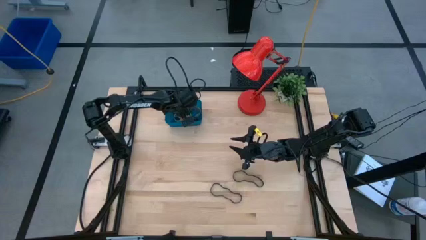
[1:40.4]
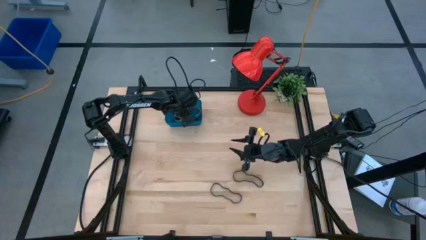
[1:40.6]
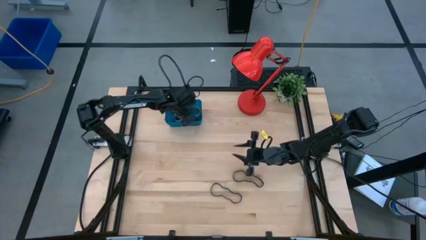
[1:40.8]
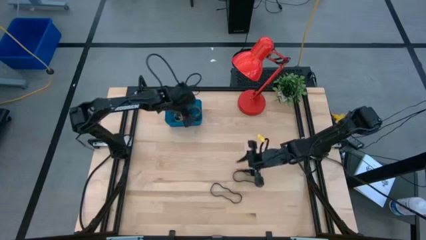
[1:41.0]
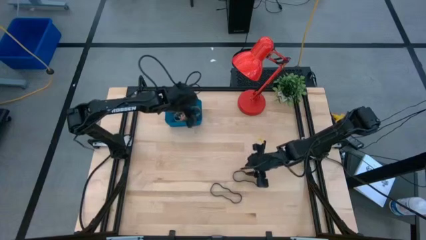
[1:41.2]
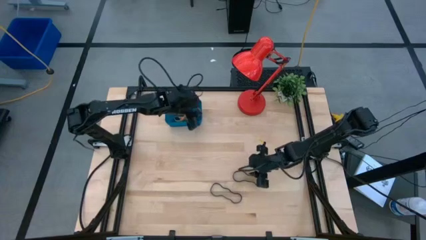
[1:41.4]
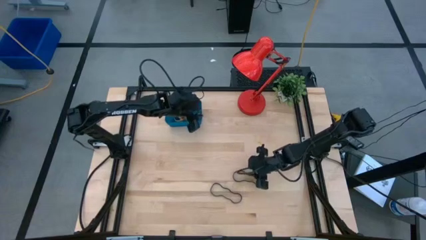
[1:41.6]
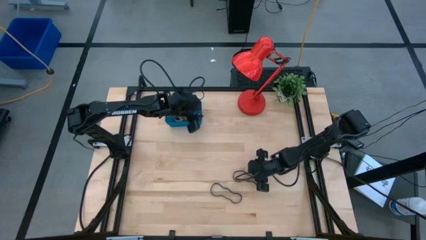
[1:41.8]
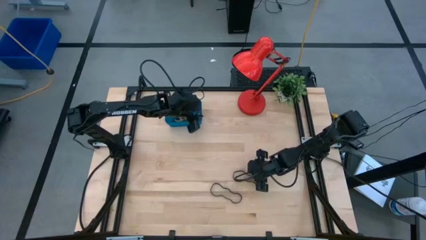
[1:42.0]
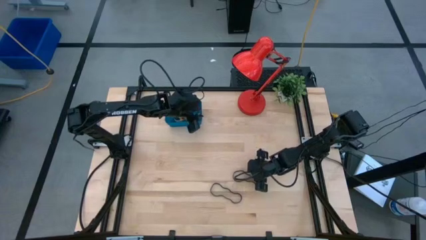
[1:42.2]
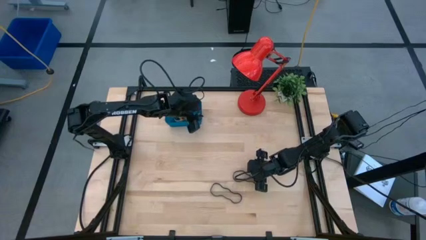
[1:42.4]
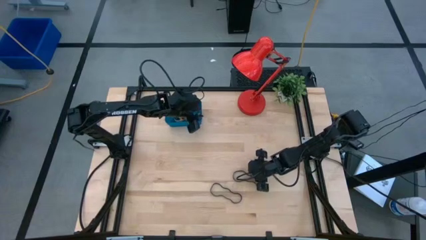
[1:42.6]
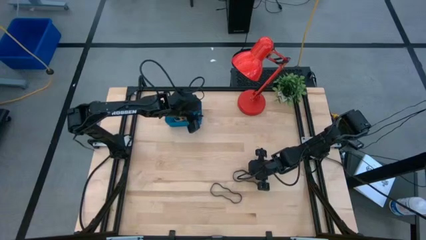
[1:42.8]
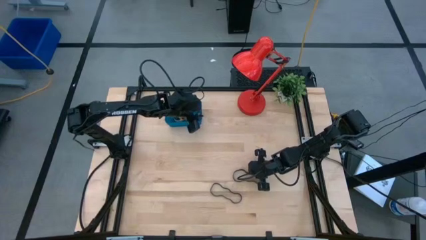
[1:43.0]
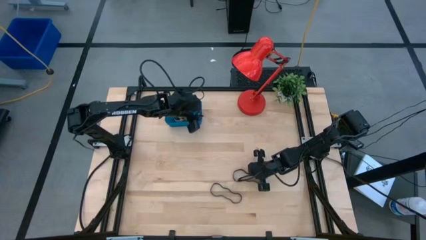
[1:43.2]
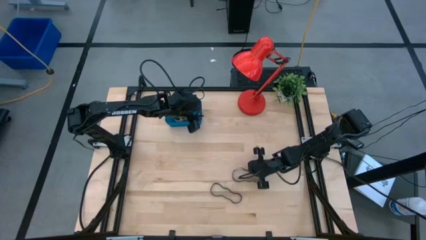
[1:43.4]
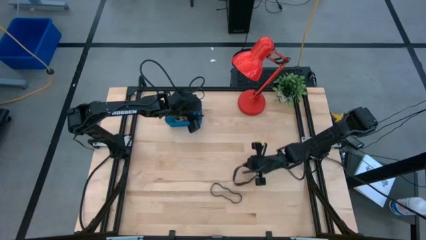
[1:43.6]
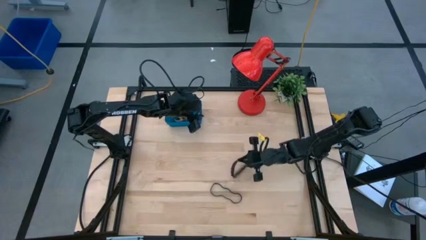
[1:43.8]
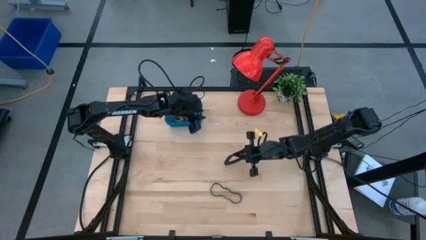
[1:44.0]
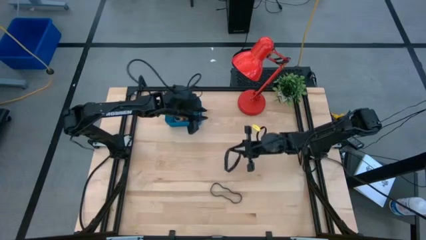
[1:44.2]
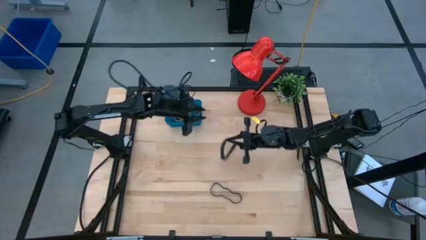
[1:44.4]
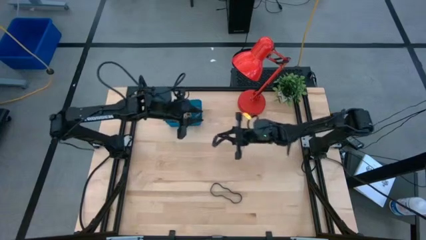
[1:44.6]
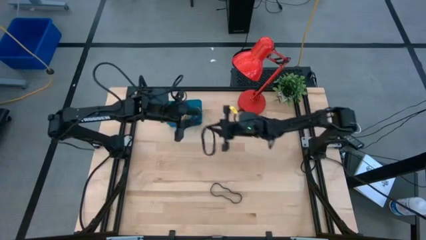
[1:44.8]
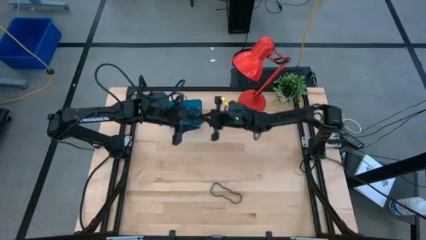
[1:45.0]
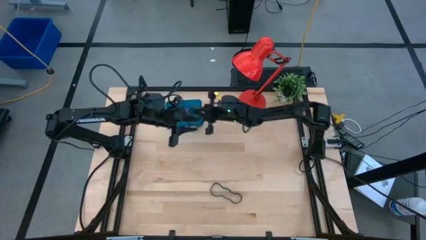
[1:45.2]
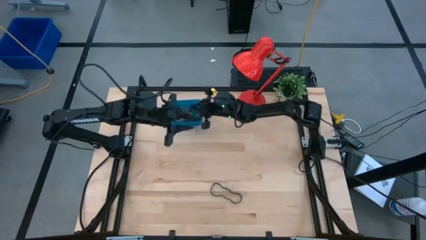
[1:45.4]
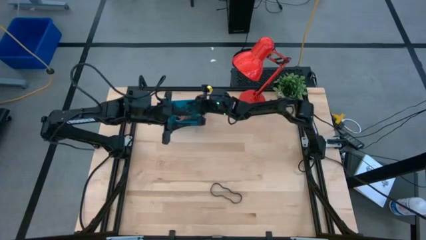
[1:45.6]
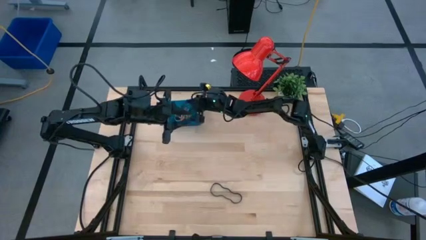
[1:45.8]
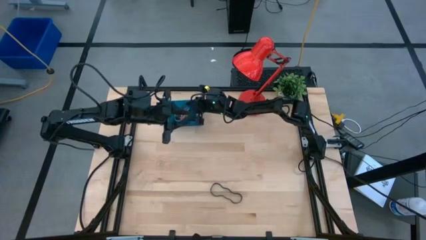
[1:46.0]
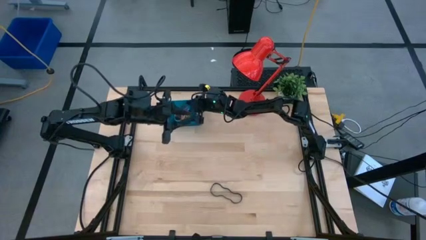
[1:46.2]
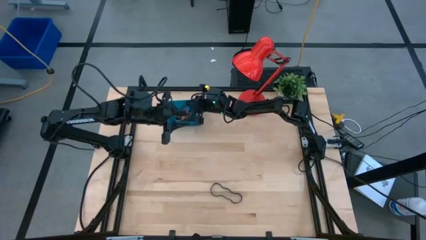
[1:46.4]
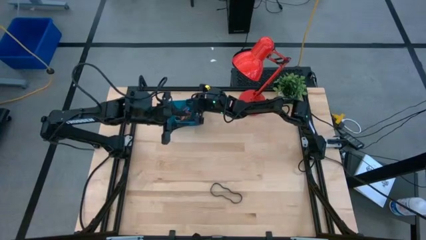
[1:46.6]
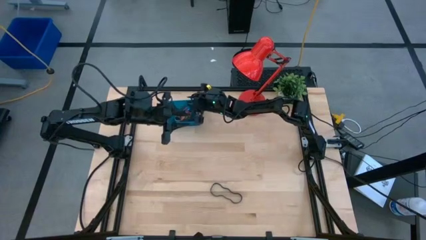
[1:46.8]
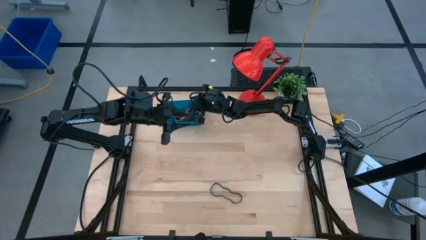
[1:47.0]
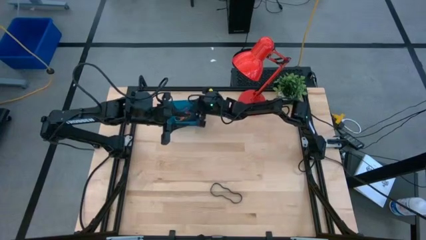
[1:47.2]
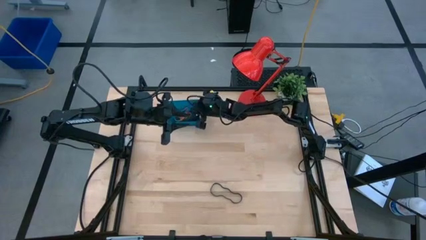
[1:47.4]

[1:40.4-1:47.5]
Task: Pick and place rubber bands into bin
Put the top black rubber band into the blue container

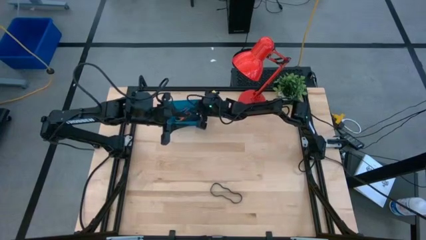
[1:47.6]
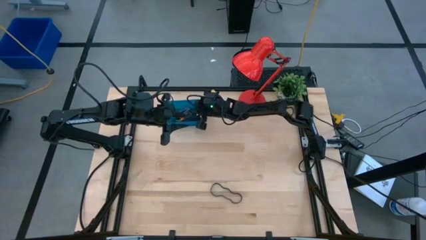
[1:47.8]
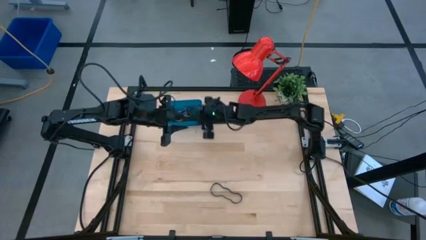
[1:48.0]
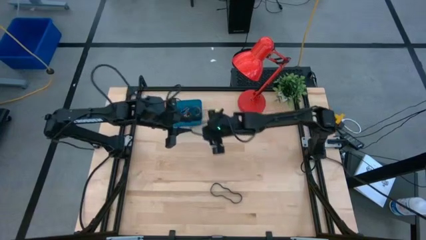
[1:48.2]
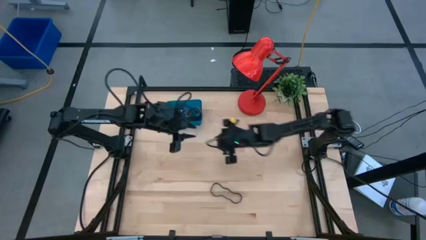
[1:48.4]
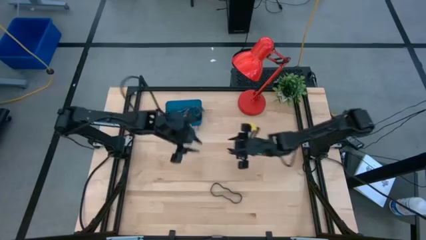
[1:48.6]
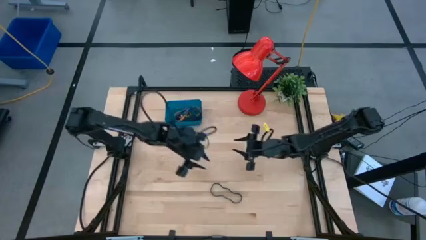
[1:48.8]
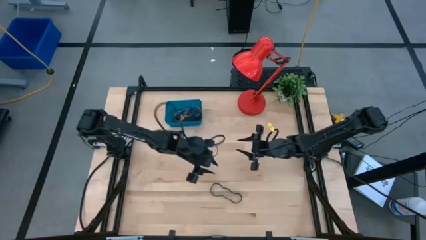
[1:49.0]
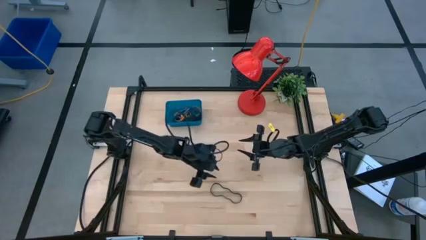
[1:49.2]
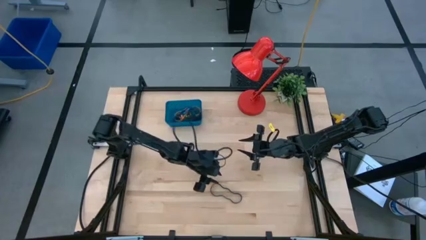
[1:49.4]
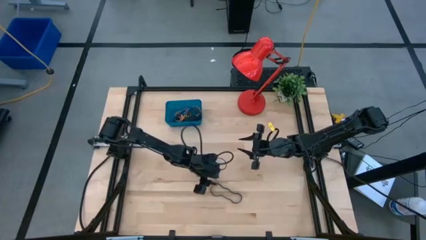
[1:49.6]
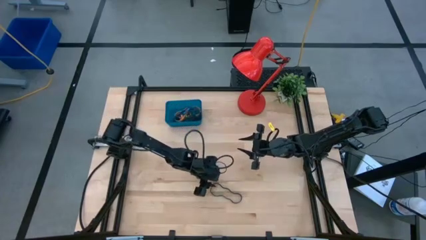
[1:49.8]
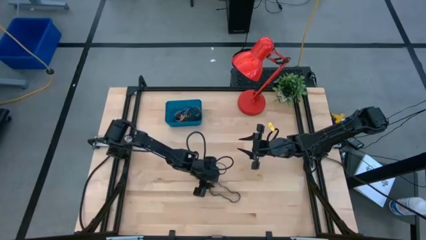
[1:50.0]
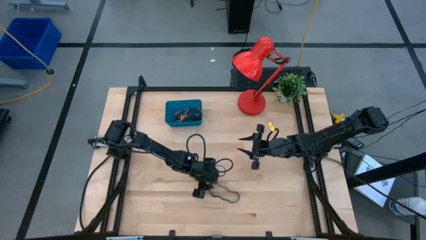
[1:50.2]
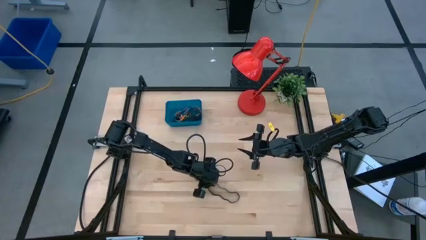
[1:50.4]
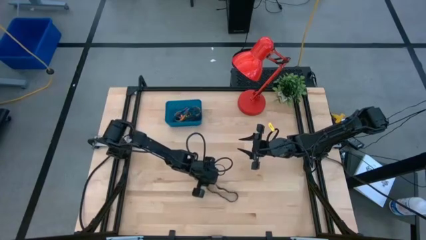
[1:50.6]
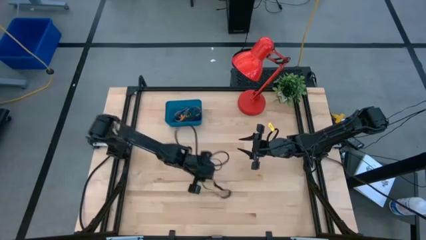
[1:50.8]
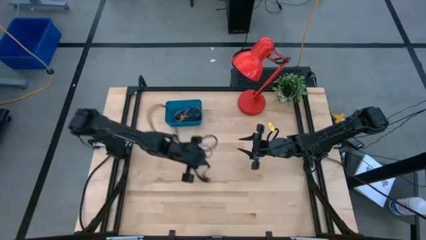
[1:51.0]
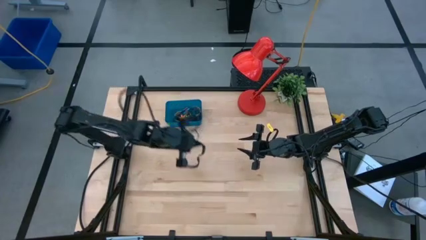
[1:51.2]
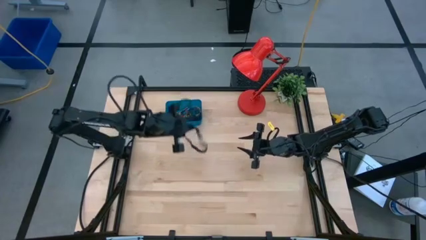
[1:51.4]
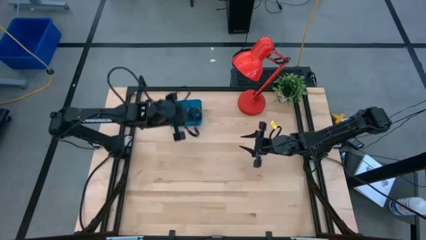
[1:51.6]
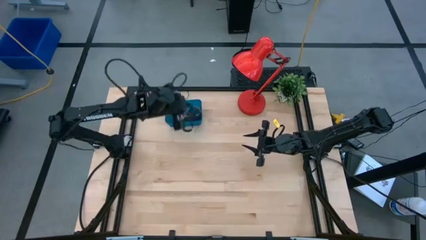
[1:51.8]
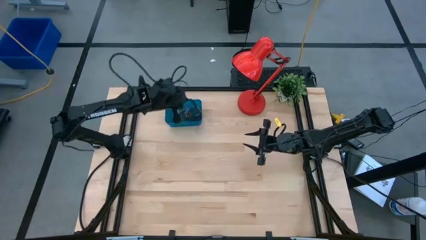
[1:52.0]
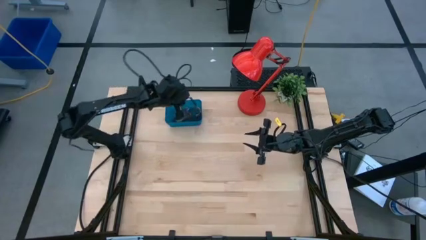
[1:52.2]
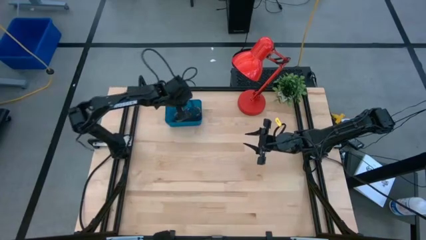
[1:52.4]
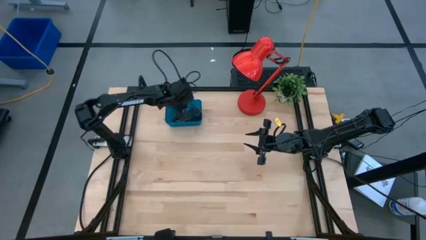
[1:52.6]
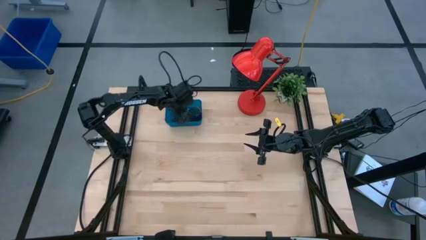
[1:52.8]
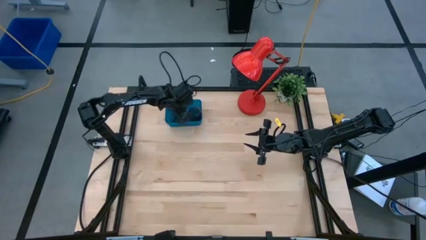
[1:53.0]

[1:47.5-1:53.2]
Put the black rubber band into the blue container

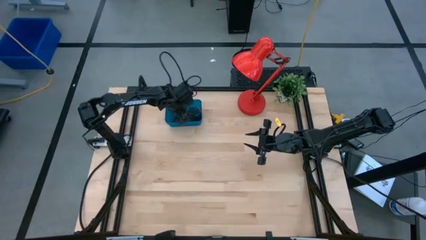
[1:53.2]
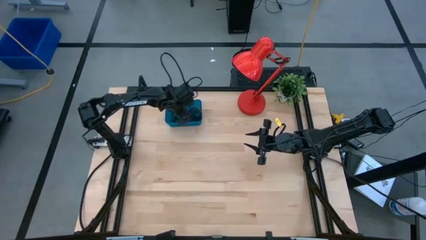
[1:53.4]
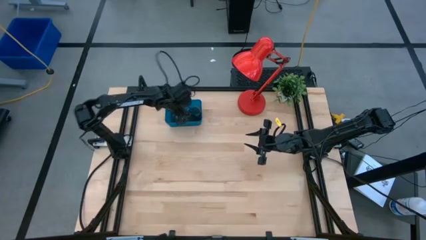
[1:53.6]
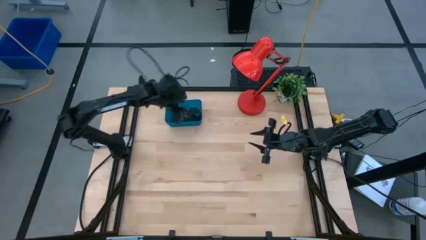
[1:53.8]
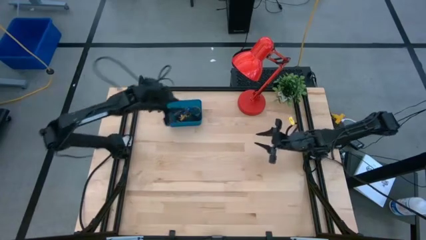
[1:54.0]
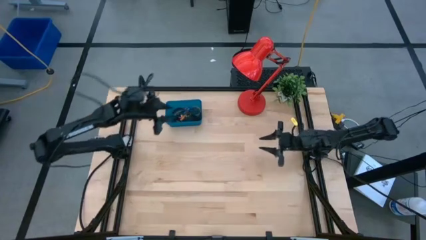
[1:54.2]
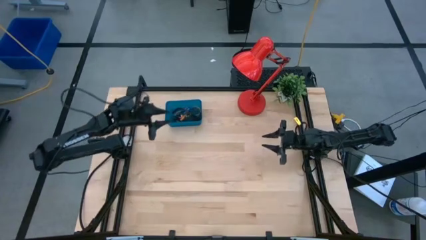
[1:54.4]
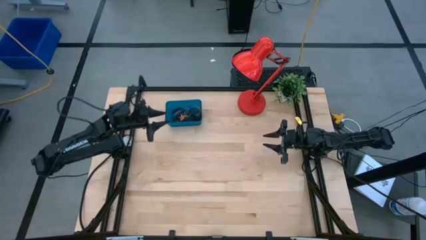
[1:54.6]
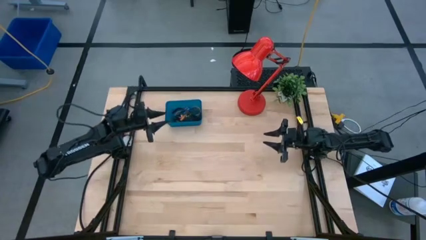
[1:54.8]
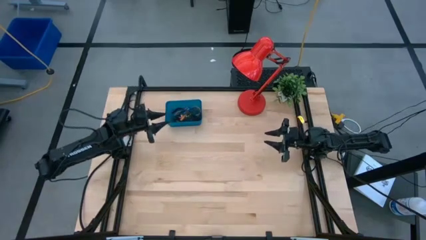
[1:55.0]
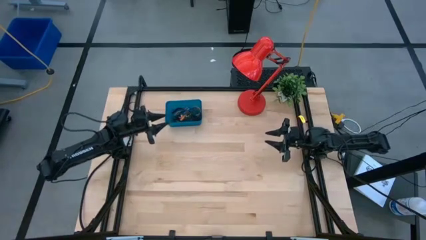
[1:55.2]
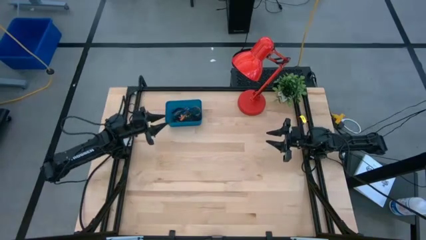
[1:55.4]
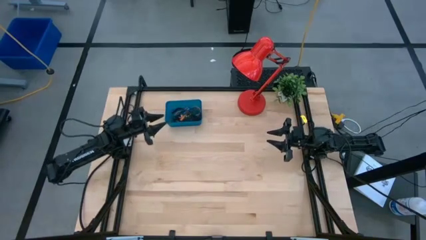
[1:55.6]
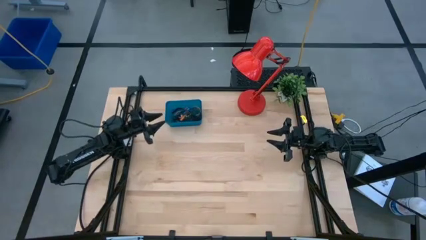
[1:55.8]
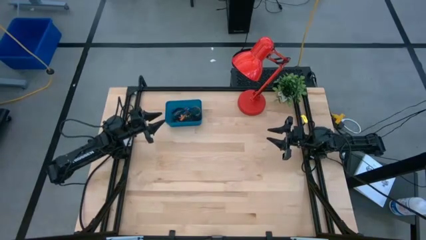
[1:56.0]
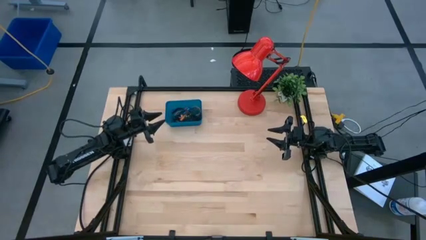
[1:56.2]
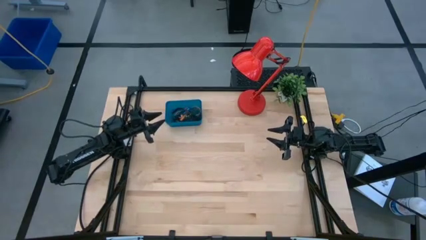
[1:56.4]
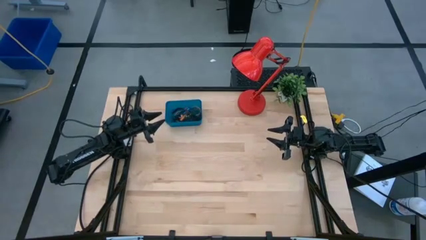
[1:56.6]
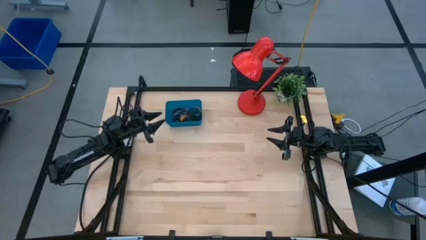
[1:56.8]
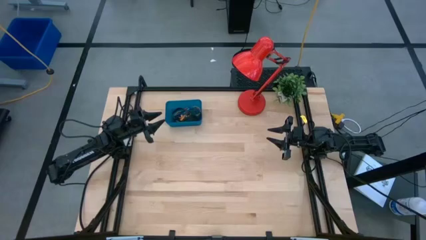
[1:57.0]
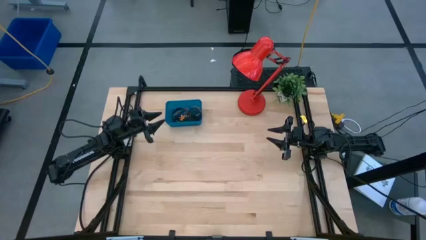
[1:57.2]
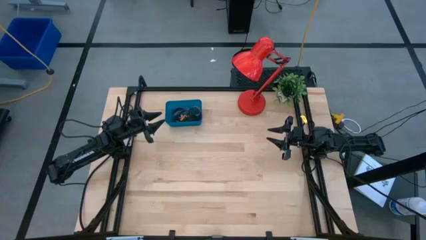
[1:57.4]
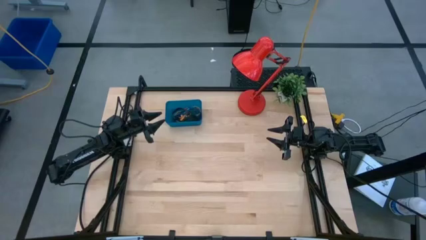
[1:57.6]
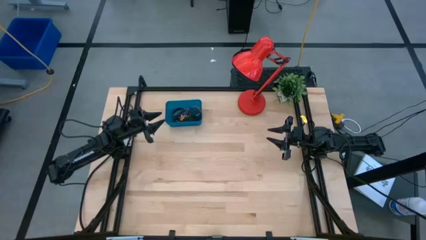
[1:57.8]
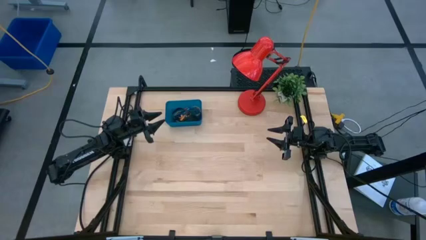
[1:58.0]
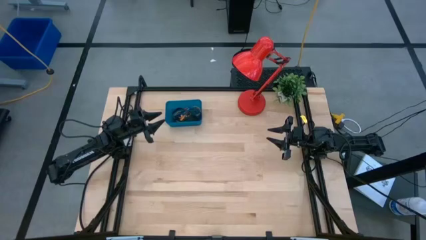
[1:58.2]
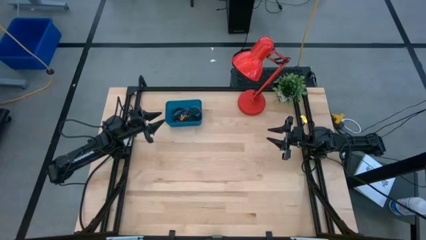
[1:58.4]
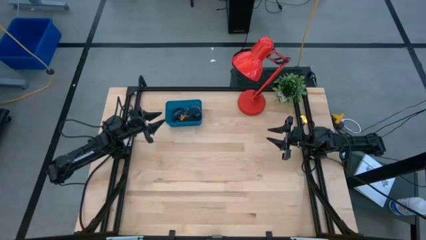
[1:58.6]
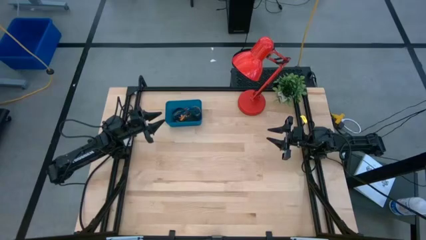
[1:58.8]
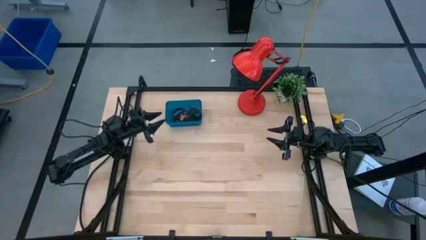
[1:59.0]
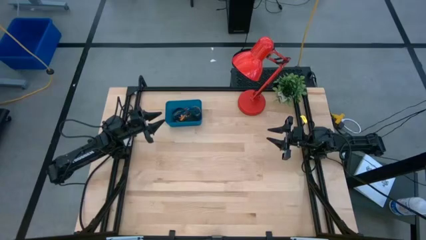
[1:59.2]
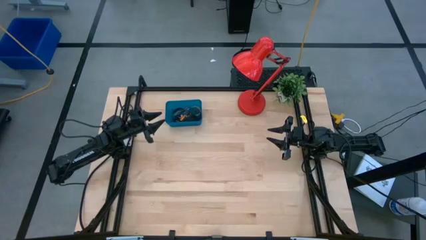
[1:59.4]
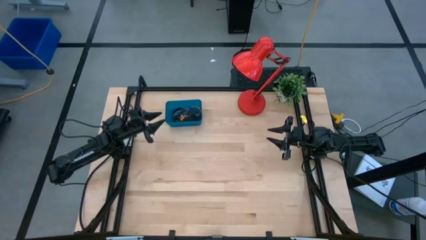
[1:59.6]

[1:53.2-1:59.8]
Return to Home Position
